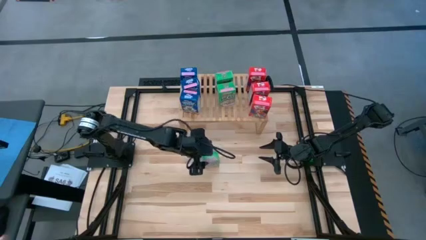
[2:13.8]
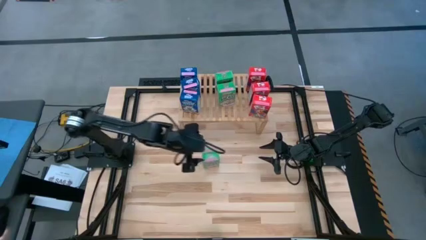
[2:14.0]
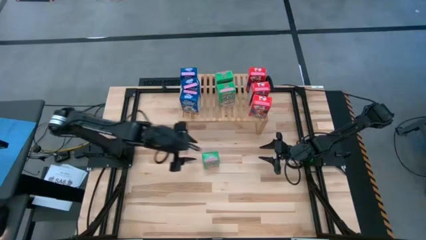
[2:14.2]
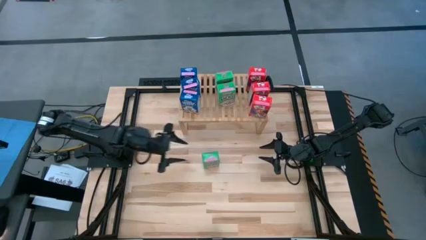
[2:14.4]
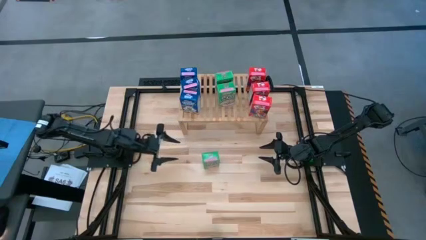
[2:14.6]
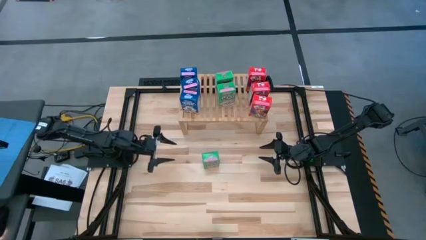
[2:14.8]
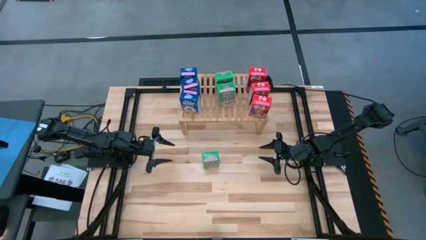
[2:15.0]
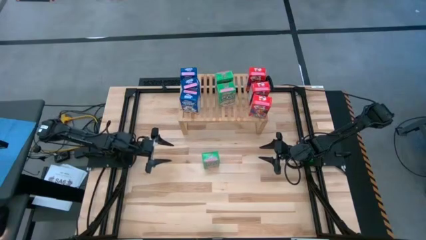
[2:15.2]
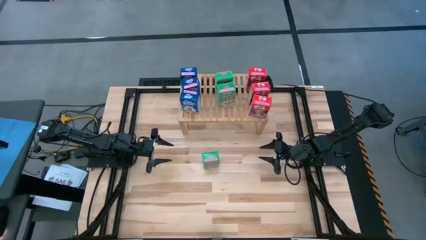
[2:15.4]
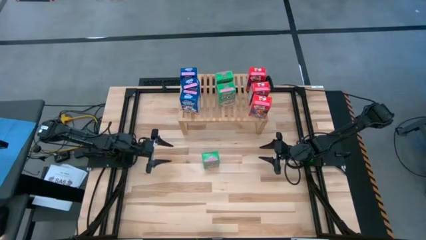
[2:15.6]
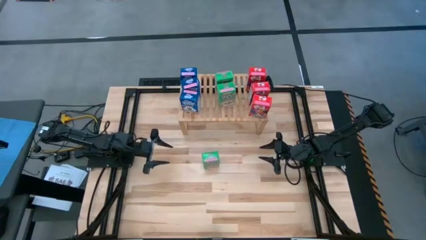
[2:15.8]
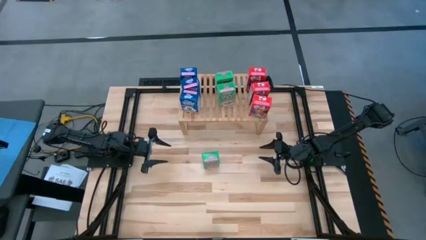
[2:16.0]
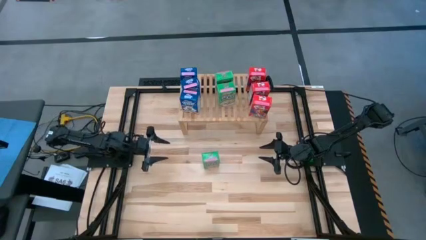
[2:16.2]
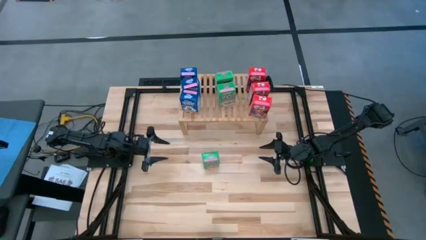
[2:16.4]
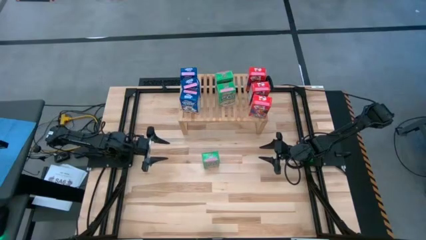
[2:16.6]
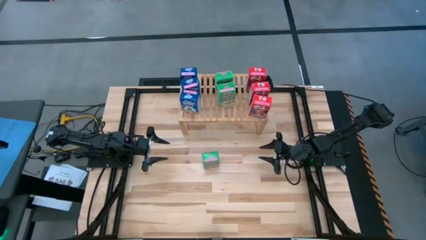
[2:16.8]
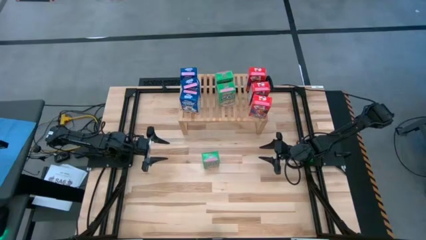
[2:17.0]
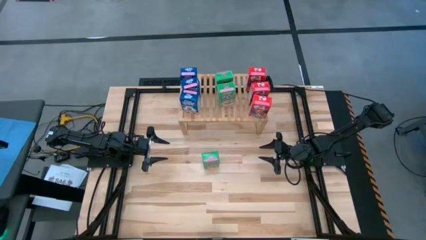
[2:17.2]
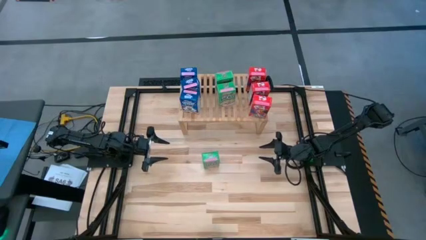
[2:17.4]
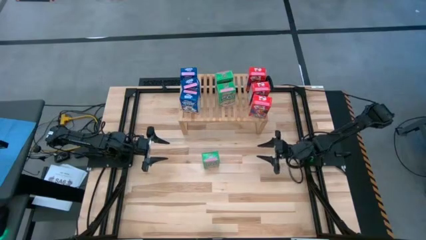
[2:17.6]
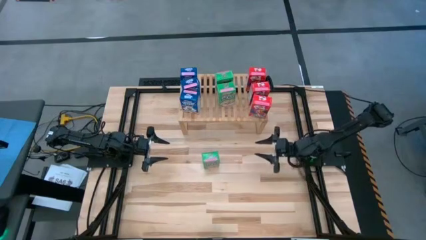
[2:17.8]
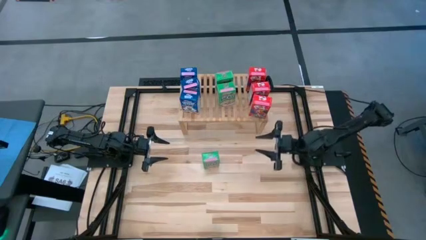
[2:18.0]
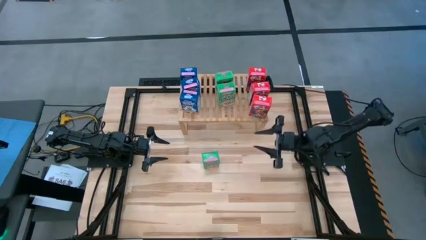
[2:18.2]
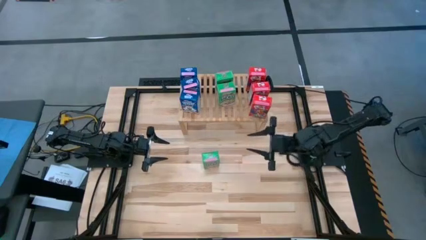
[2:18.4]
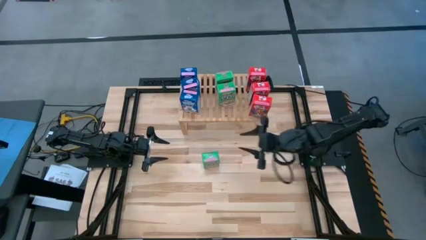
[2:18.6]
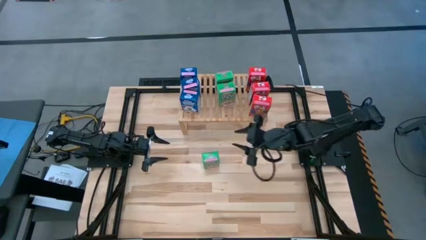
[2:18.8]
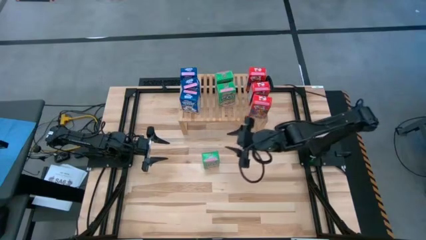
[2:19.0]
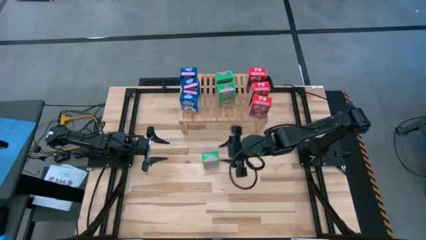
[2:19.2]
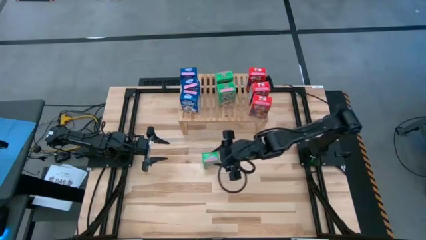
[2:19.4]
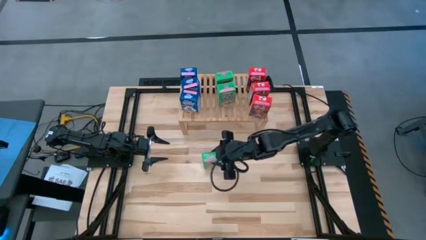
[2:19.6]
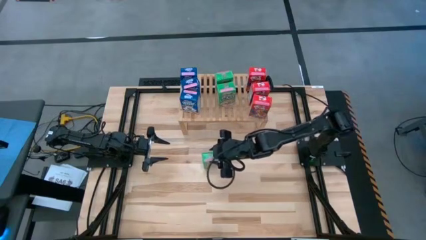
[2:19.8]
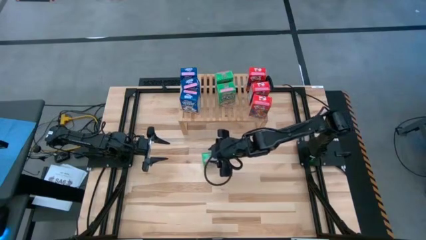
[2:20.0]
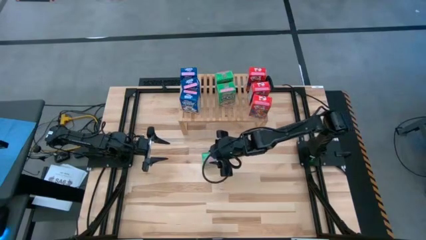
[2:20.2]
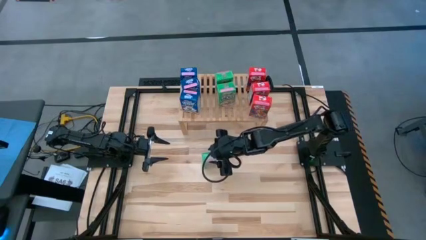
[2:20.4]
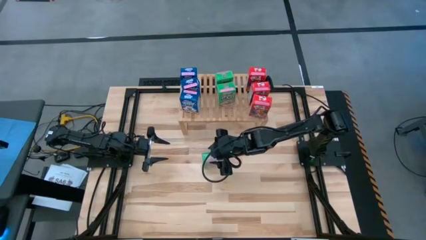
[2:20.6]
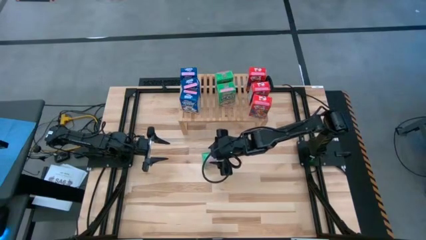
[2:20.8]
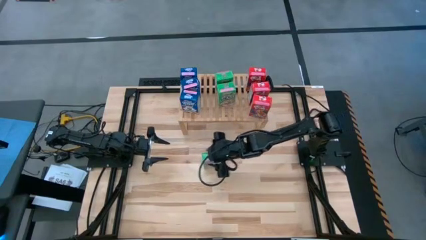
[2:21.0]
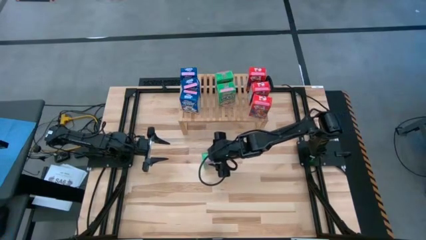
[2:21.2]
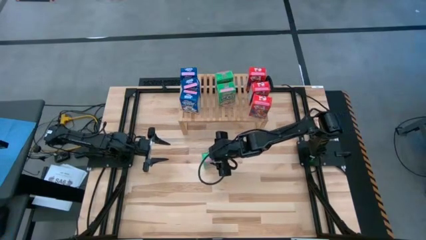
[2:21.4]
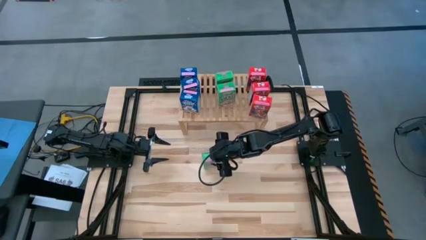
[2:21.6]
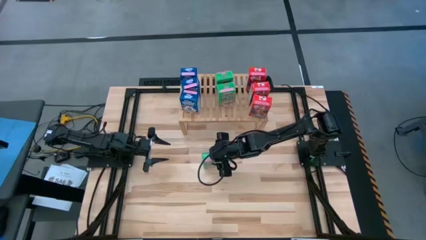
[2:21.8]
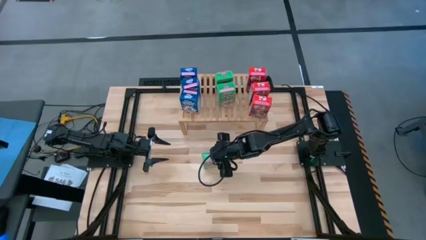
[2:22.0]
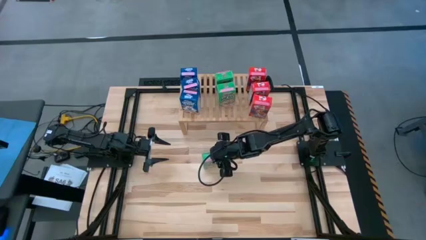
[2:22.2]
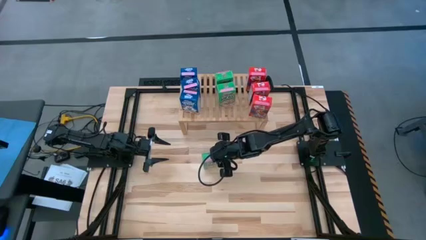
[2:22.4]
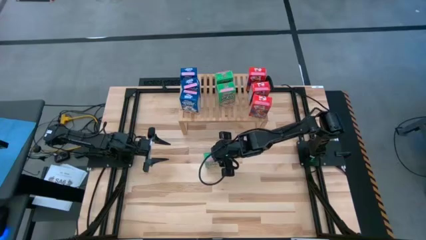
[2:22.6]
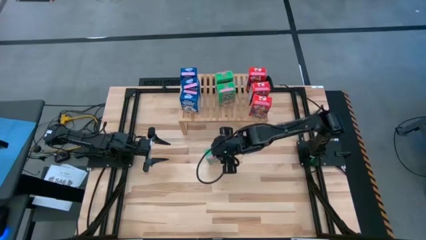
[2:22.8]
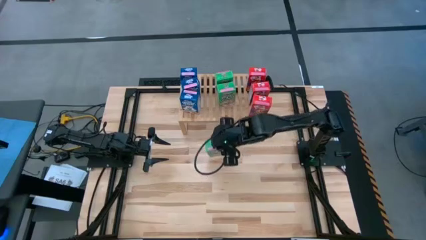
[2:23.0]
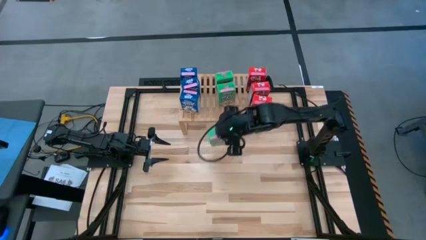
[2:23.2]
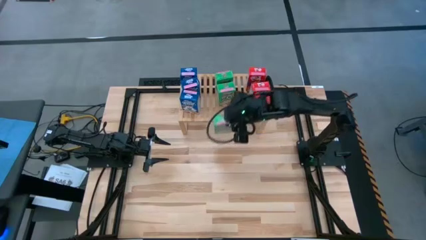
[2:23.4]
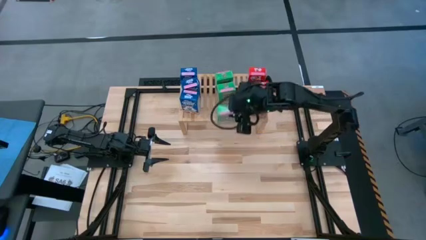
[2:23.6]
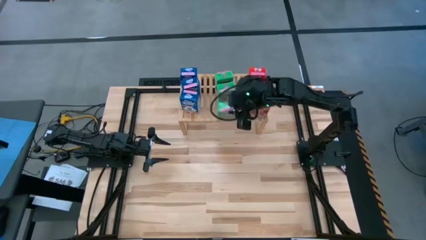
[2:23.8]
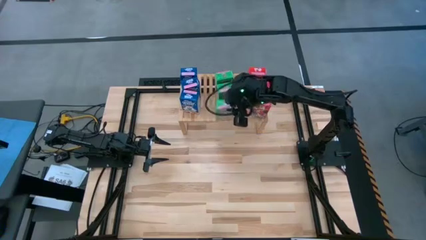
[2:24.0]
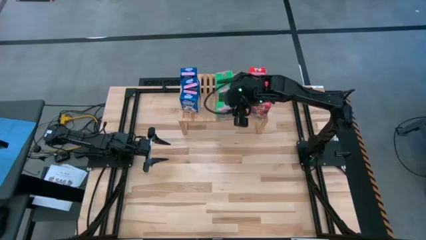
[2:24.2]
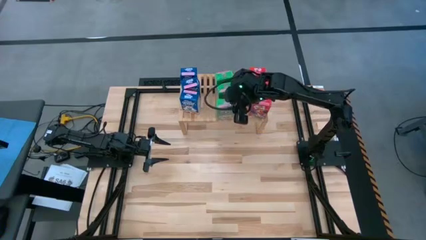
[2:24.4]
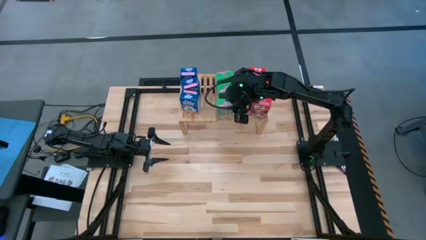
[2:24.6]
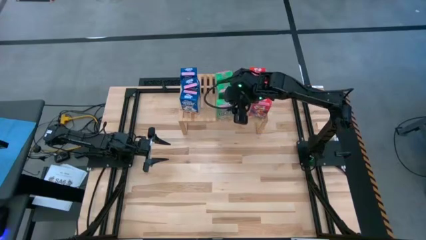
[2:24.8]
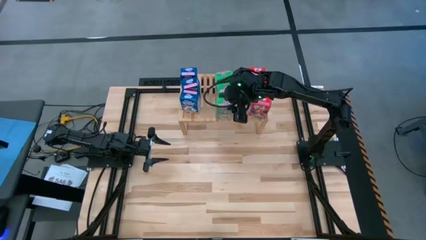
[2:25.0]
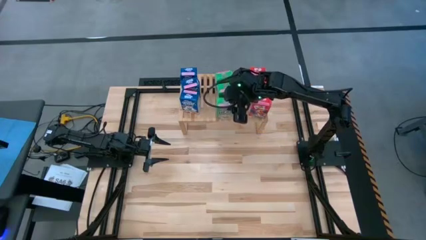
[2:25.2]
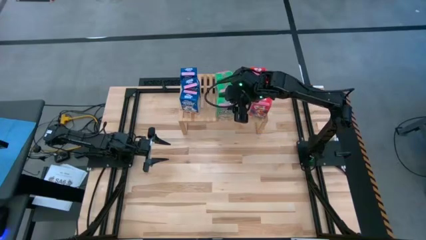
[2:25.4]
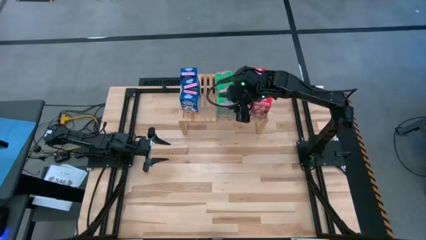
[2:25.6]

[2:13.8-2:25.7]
Task: Stack cereal on shelf
Put the green cereal box on the shelf aligned with the other green cereal box

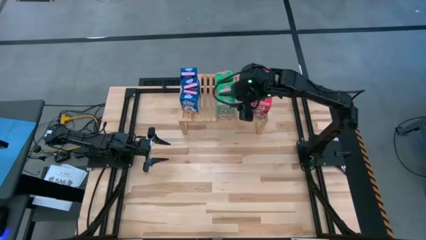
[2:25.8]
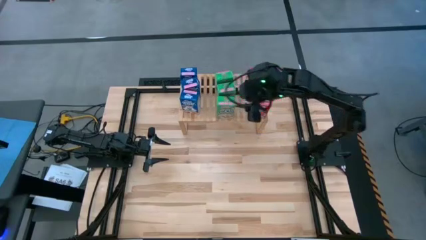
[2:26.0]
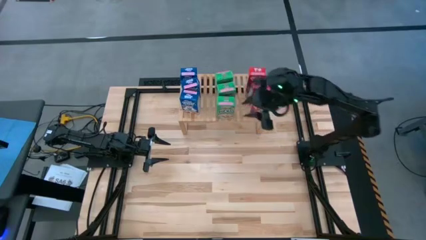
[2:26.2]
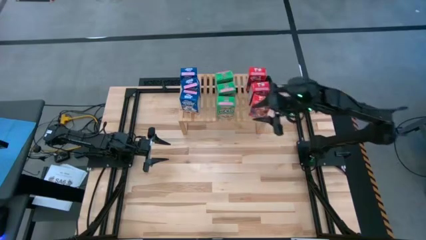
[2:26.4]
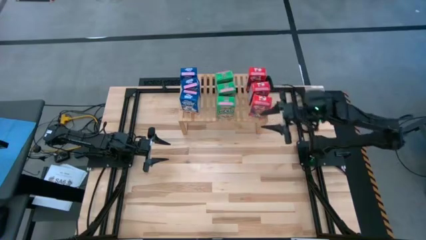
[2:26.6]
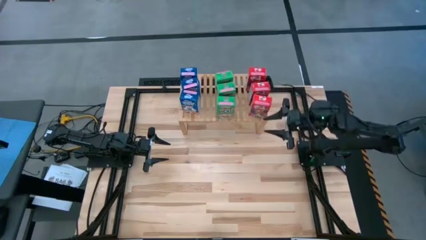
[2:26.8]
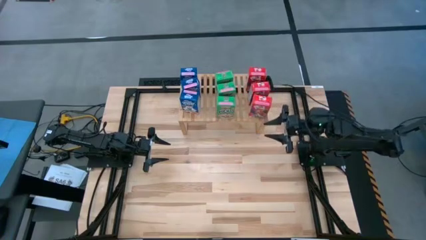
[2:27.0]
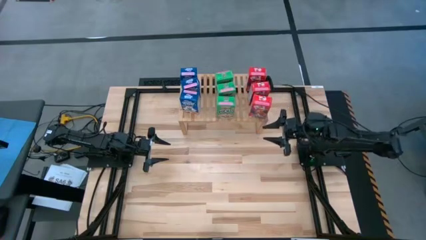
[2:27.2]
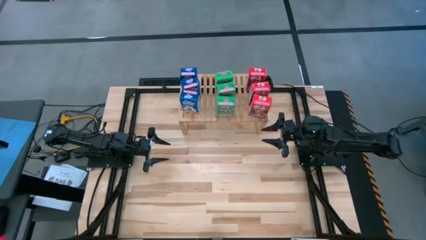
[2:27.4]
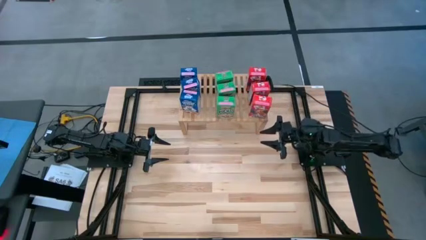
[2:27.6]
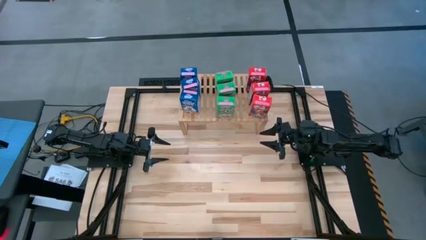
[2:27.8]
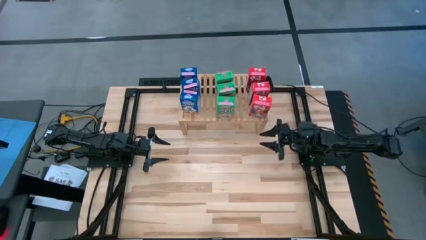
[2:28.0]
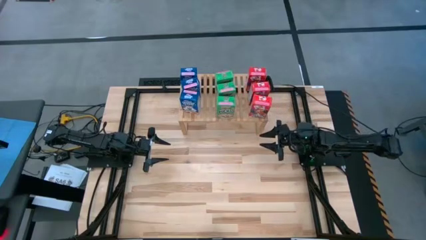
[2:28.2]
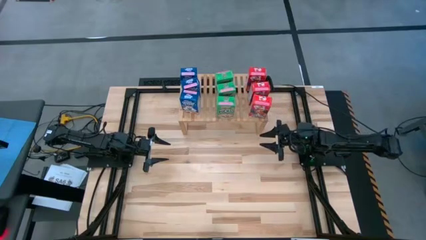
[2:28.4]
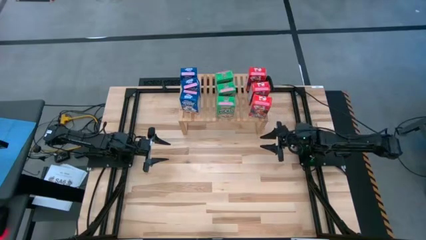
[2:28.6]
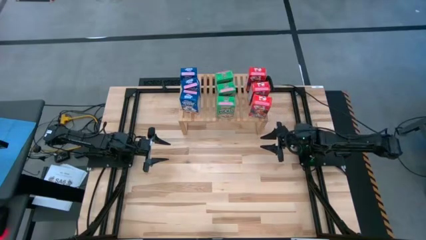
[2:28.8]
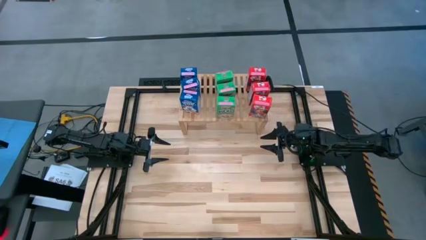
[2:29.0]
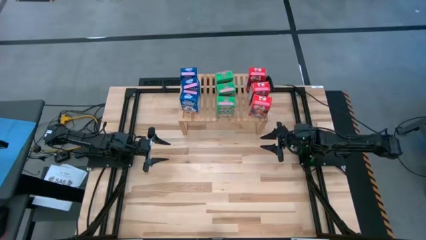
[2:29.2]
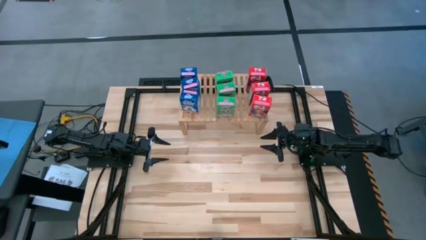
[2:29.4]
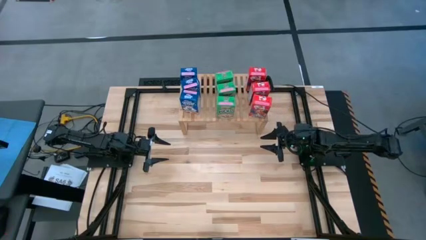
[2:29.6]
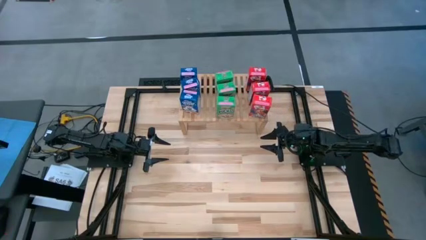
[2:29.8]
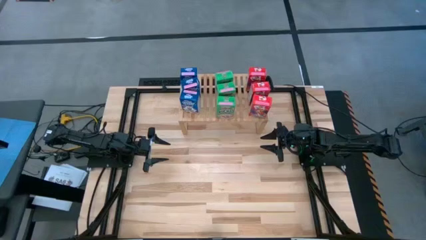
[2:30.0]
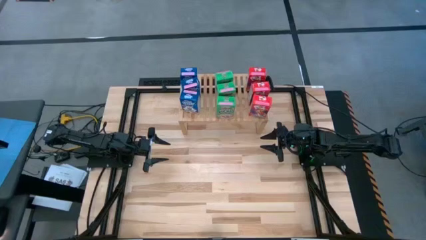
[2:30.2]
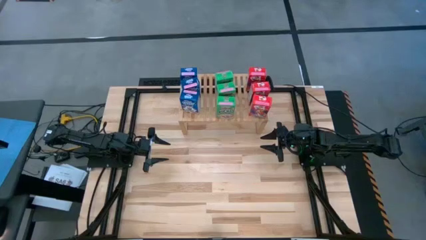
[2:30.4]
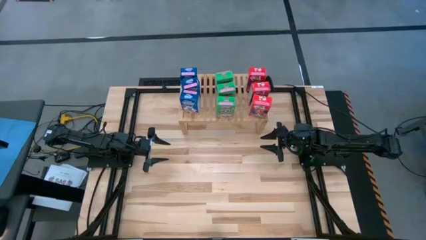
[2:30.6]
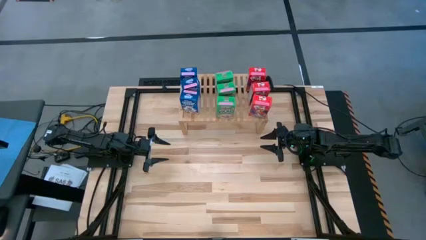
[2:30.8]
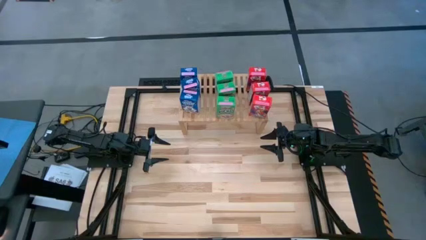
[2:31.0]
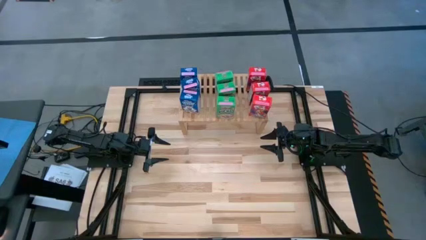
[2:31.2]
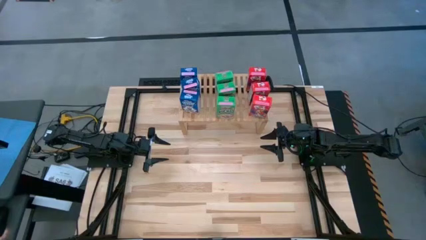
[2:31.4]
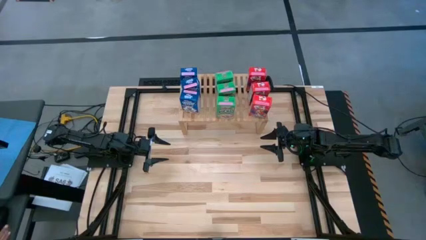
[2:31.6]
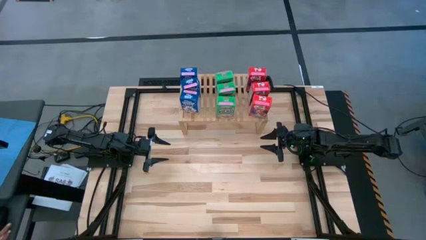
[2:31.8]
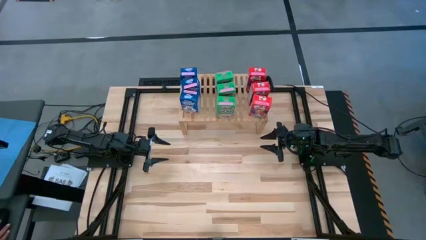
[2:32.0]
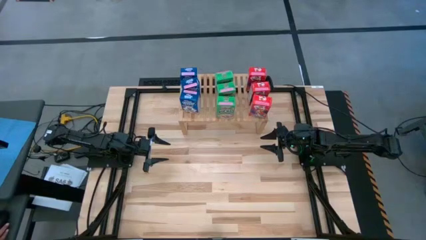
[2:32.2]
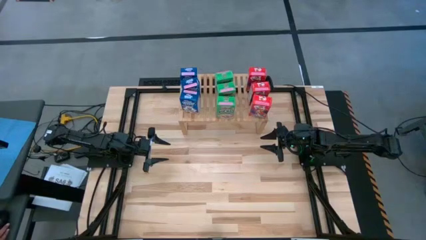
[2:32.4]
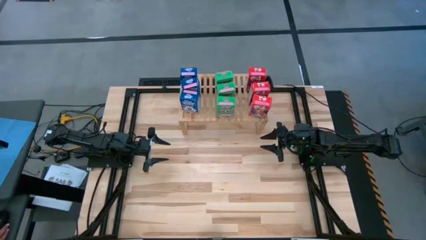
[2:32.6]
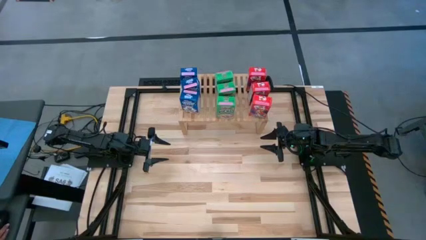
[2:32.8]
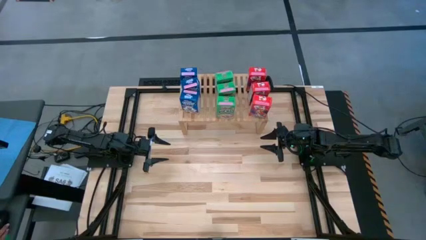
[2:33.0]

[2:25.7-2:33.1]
Return to Home Position
